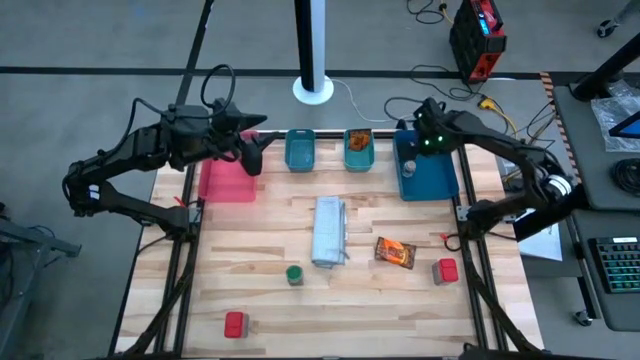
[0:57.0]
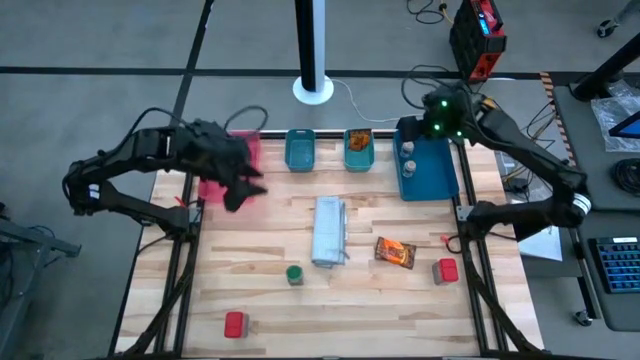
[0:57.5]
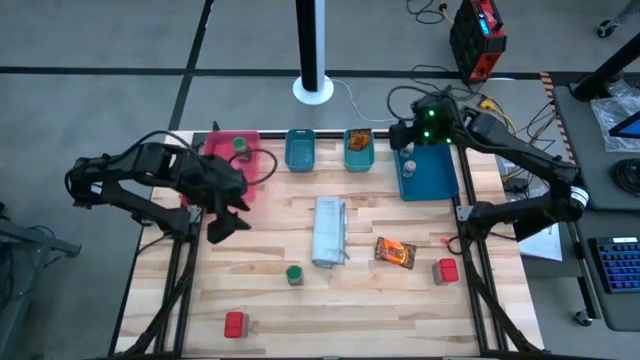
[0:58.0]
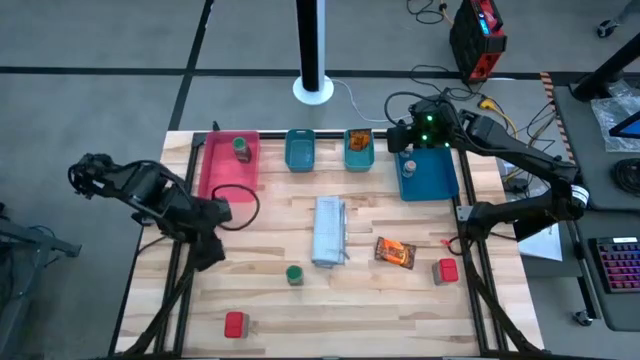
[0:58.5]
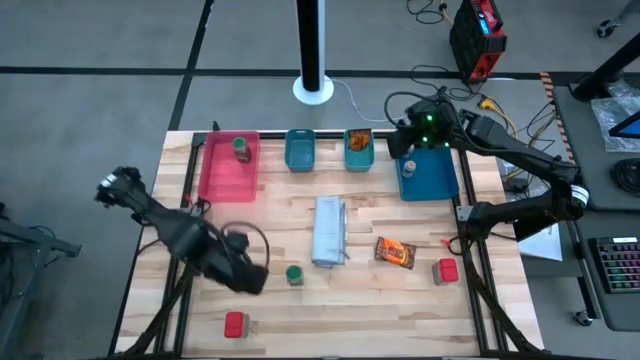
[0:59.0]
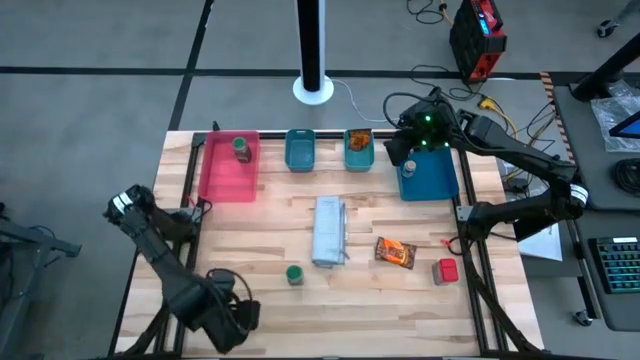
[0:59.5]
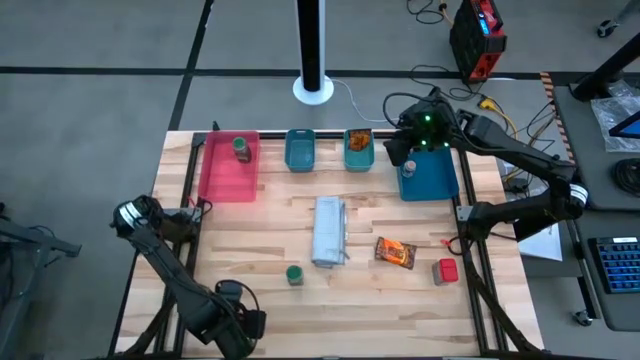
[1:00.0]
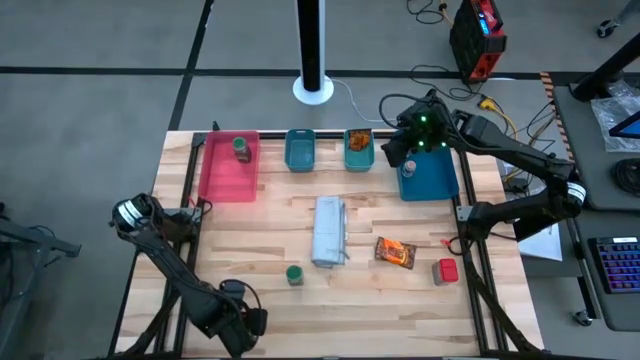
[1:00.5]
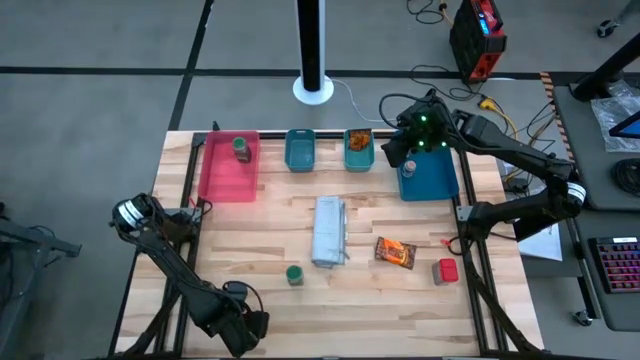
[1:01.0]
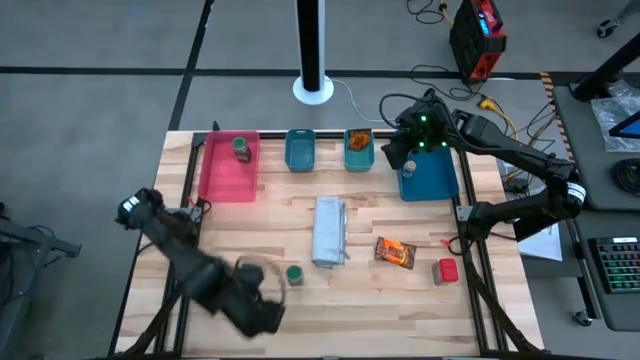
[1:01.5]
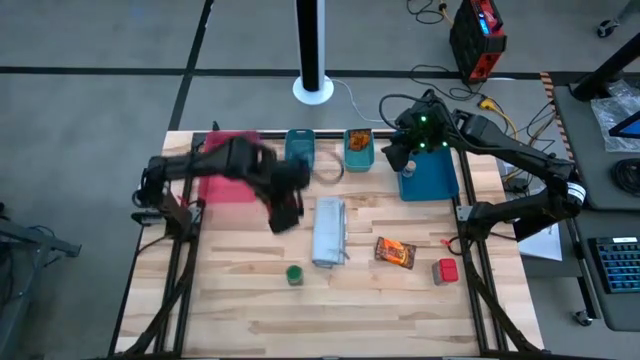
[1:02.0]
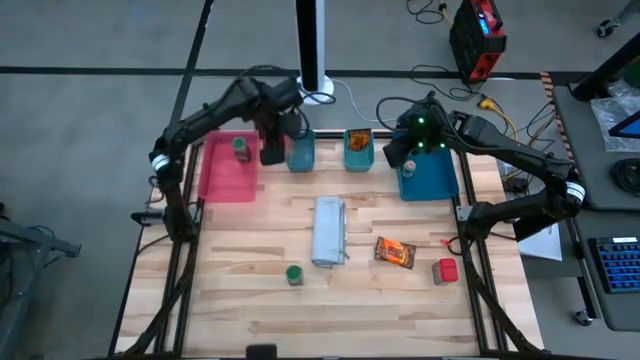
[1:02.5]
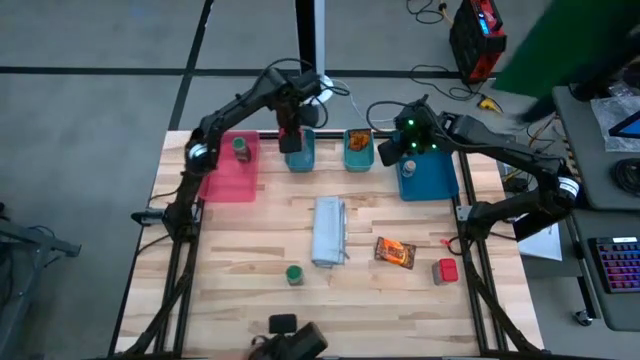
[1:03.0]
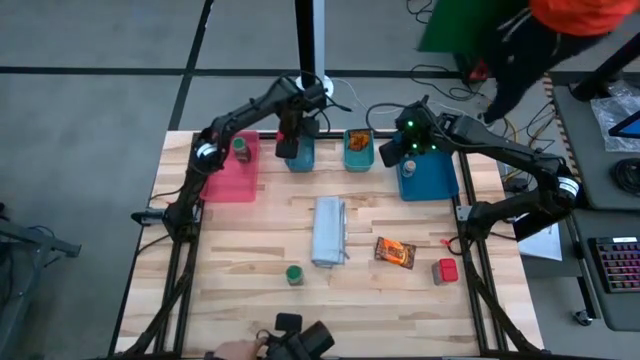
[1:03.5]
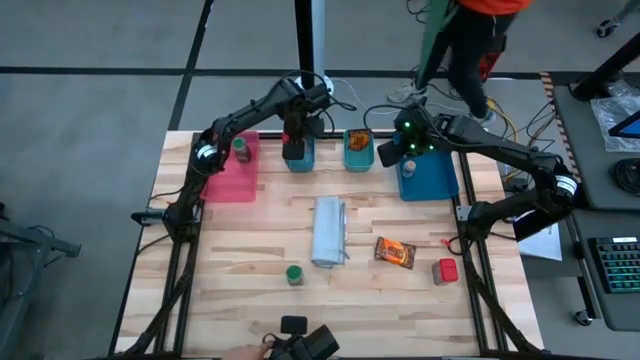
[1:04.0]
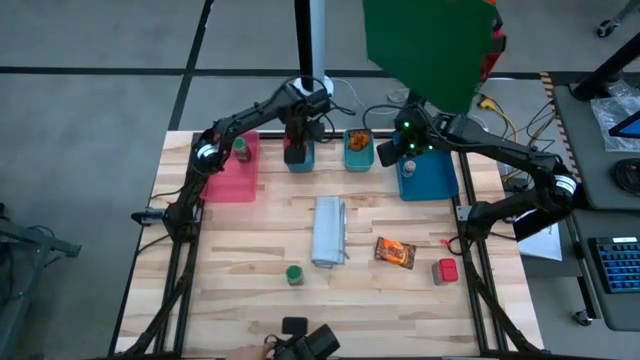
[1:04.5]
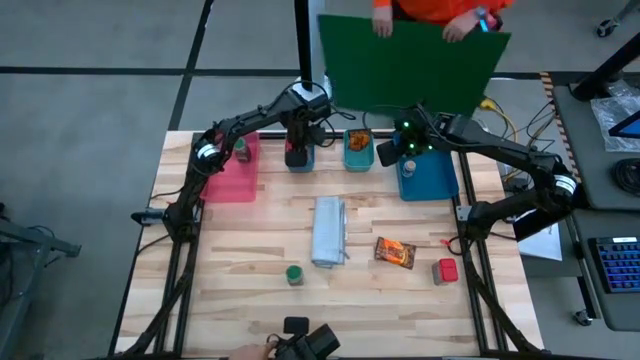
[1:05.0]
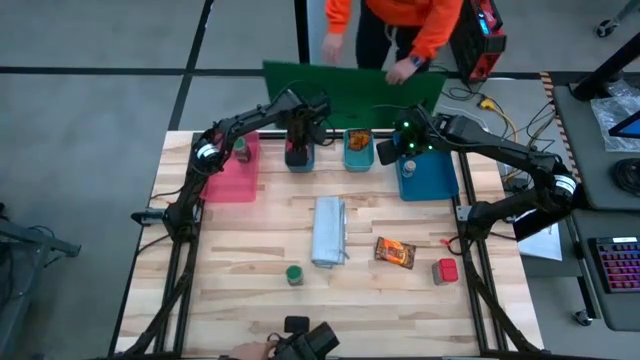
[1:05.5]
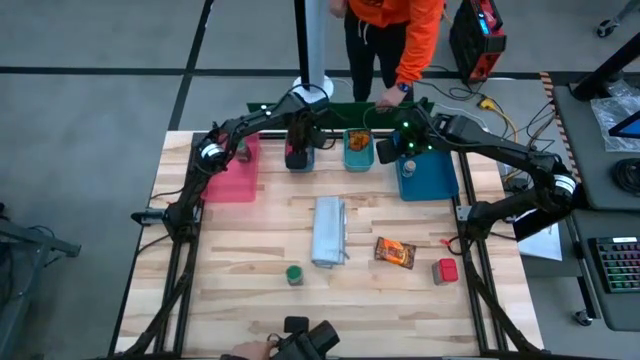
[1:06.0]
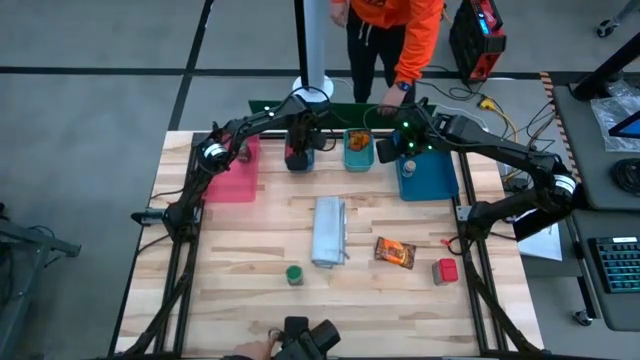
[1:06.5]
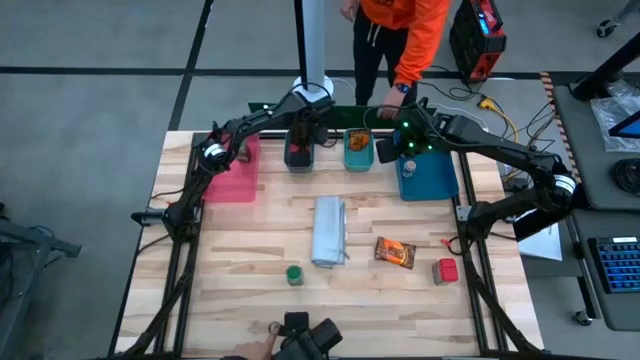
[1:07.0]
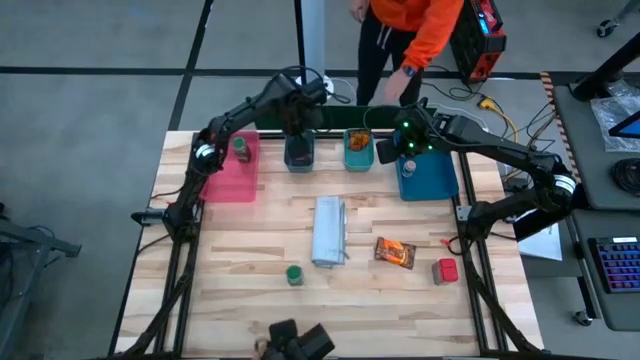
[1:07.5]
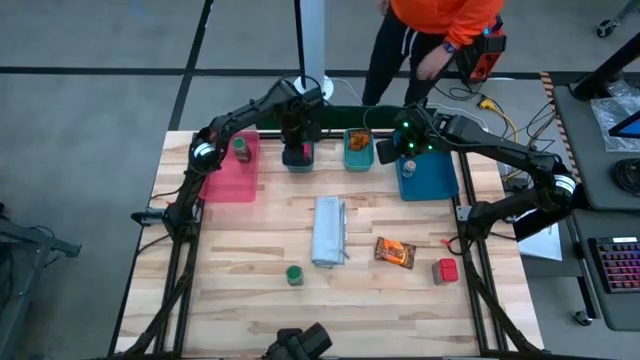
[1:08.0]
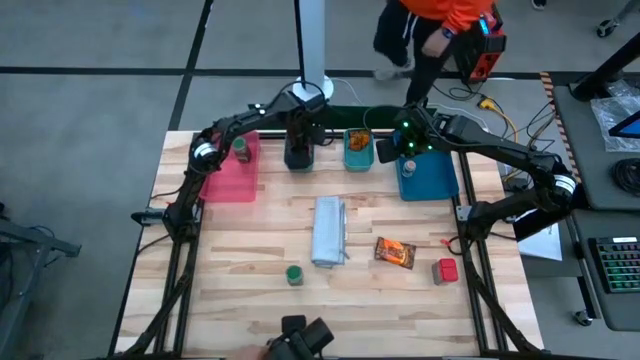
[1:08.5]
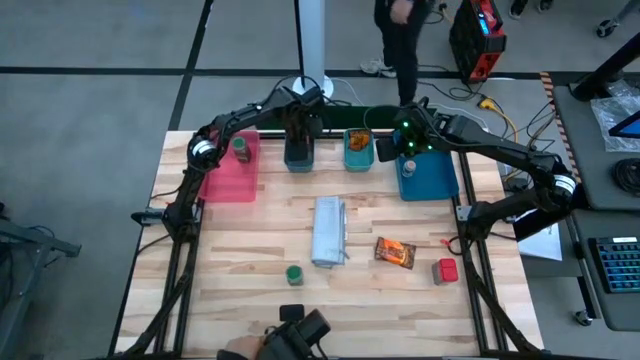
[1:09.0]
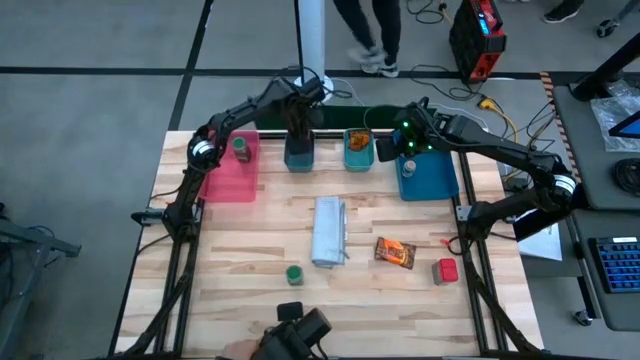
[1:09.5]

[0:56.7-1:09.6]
Task: Sort spices by type
Put the left red seasoning can into the dark green bin

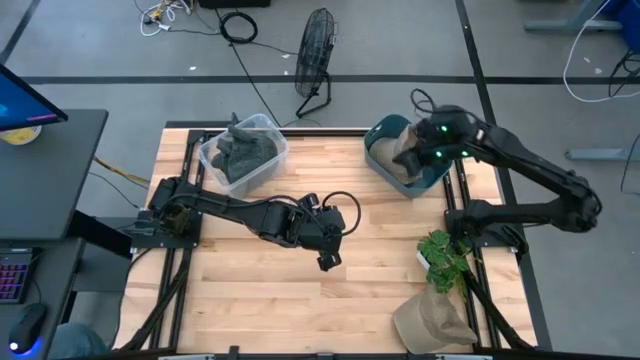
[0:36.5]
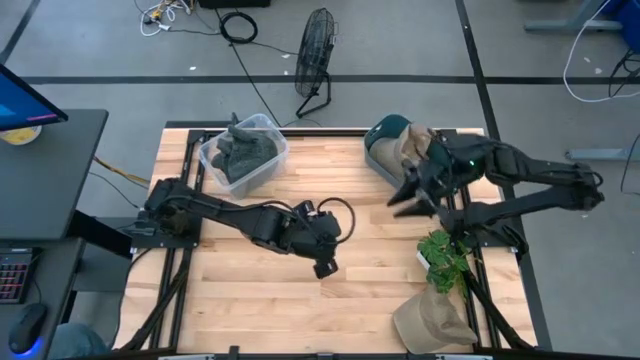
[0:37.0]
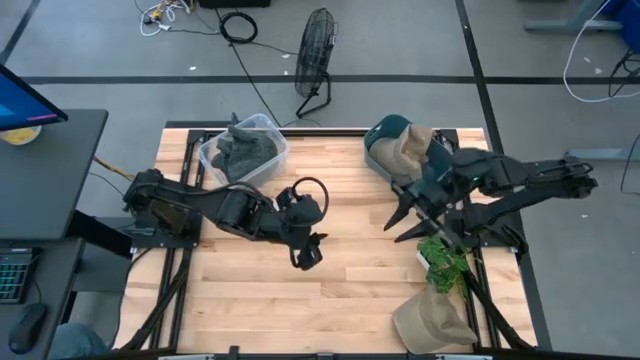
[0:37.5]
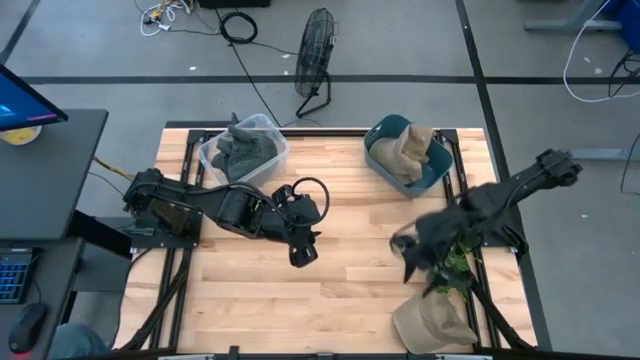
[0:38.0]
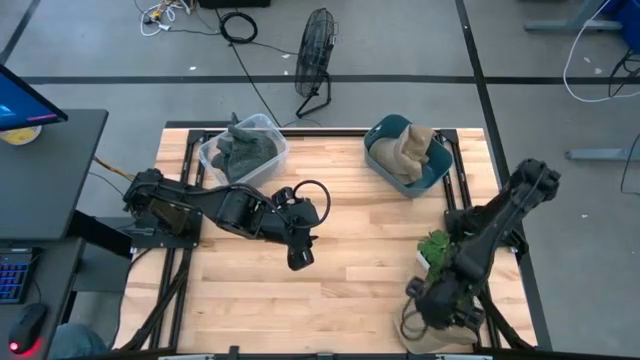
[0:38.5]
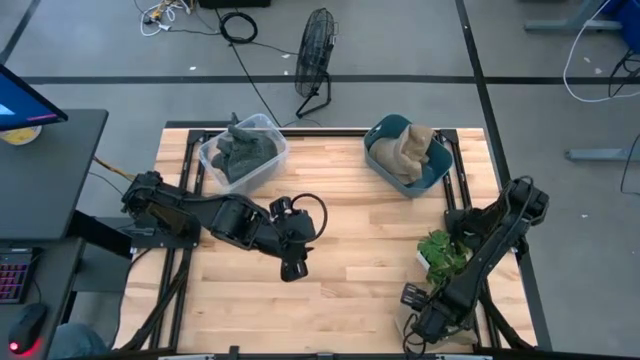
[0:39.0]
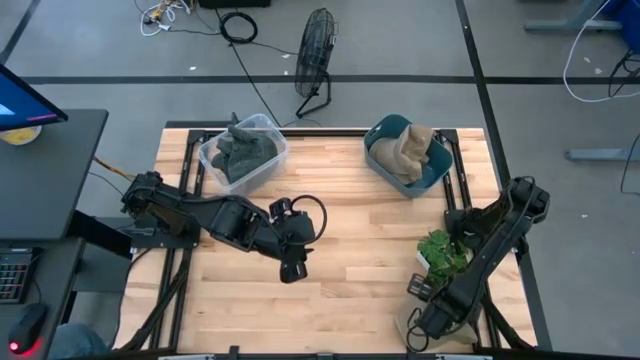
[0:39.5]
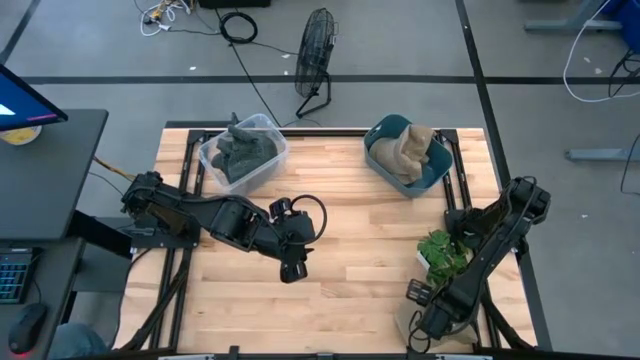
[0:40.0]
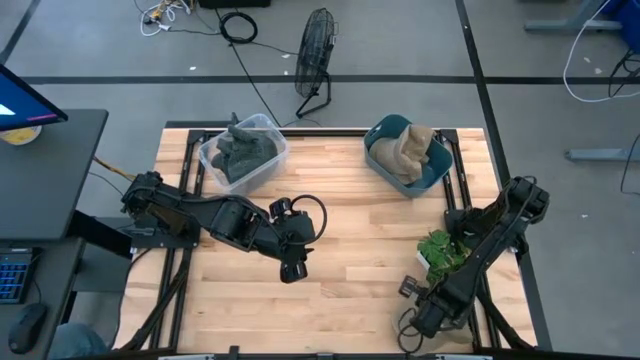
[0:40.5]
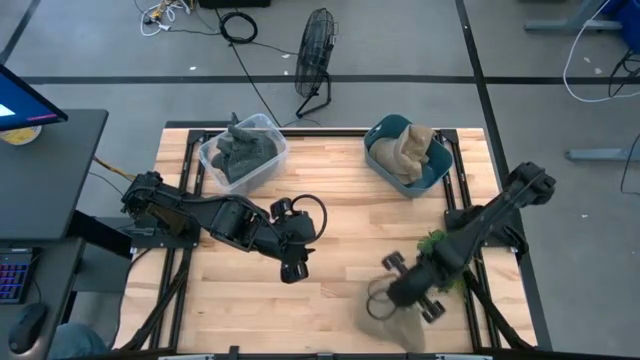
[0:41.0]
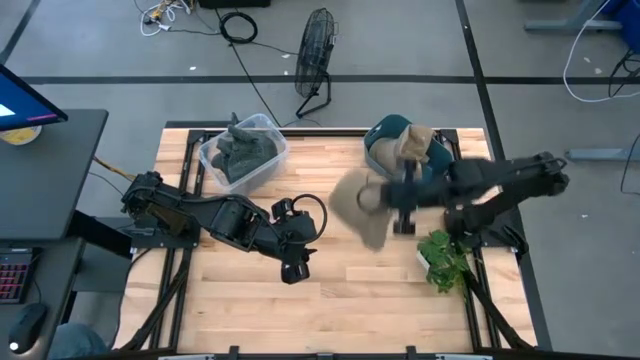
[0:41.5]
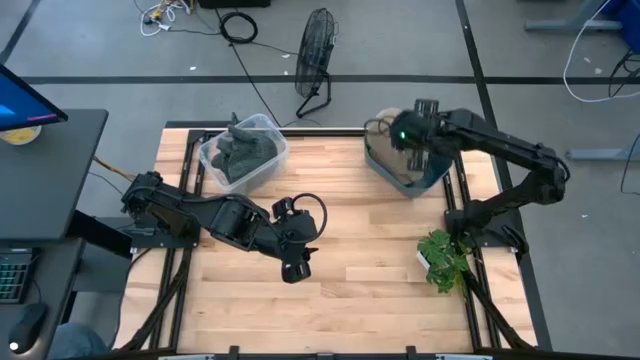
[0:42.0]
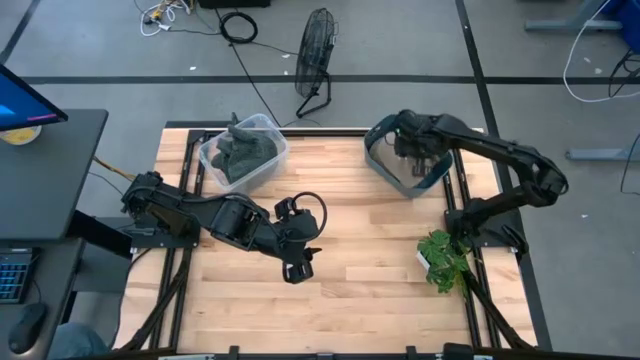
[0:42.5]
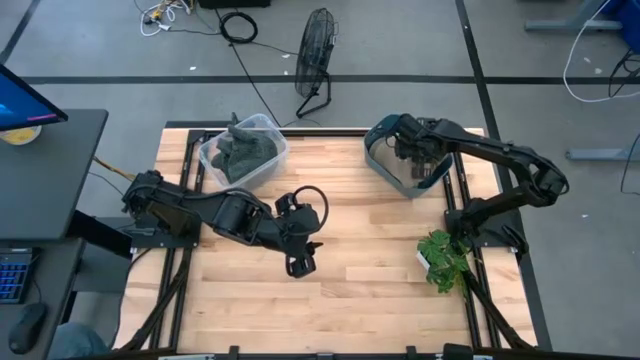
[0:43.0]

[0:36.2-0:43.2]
Task: Pick & Place hat
Put the light brown cap into the blue bin
